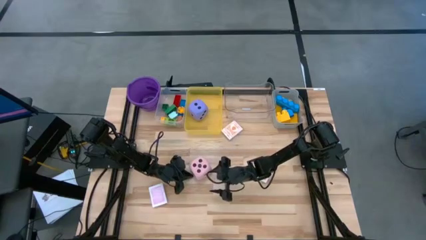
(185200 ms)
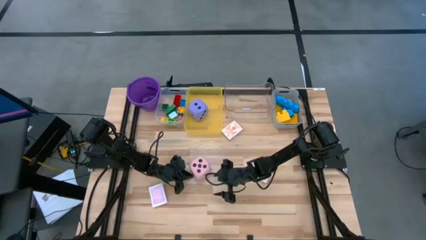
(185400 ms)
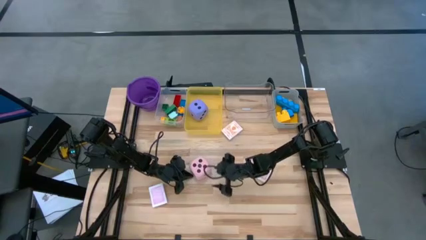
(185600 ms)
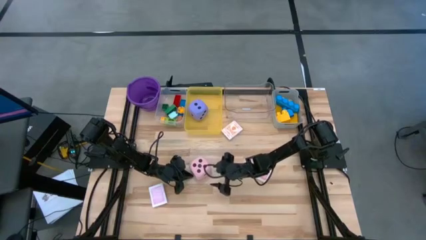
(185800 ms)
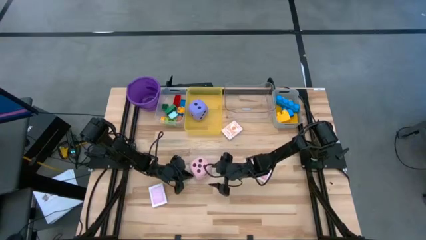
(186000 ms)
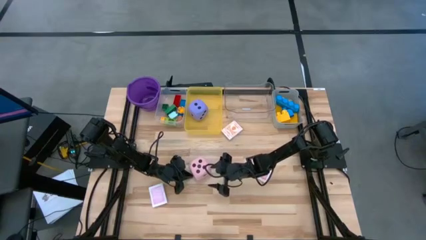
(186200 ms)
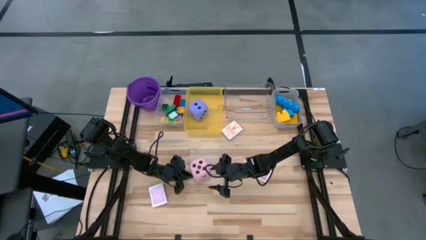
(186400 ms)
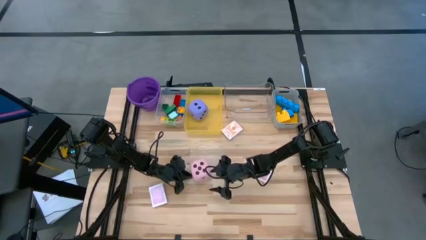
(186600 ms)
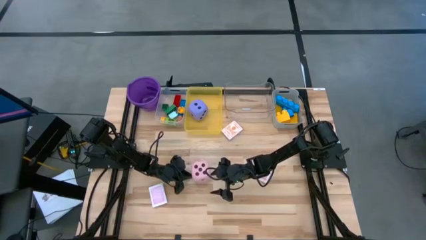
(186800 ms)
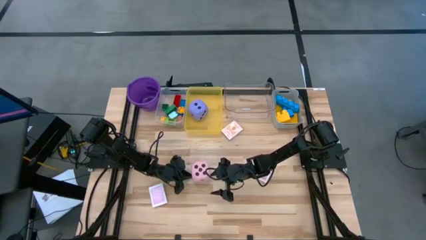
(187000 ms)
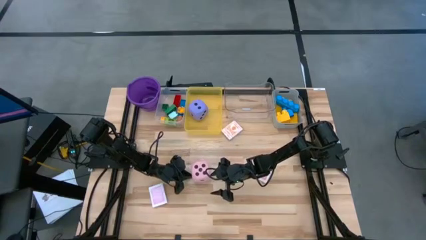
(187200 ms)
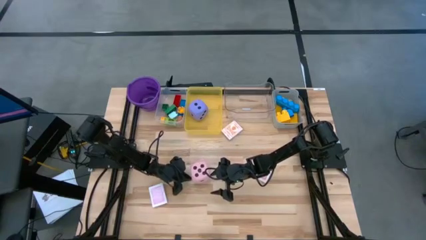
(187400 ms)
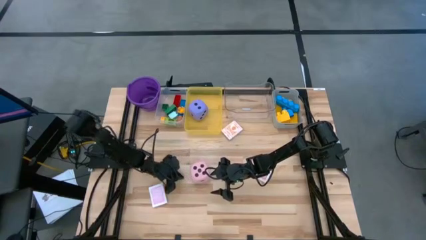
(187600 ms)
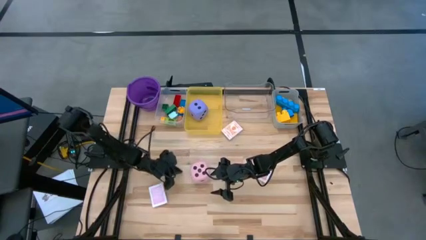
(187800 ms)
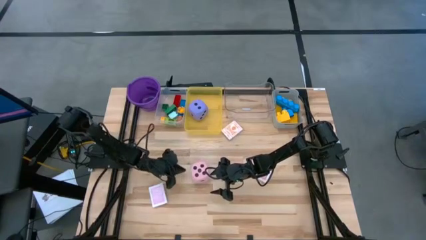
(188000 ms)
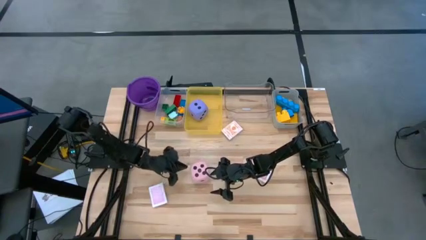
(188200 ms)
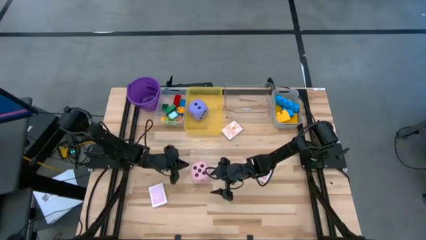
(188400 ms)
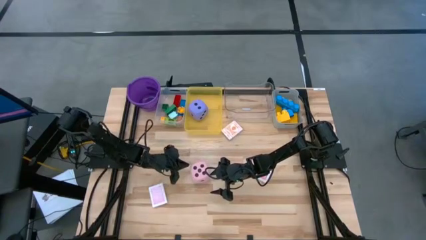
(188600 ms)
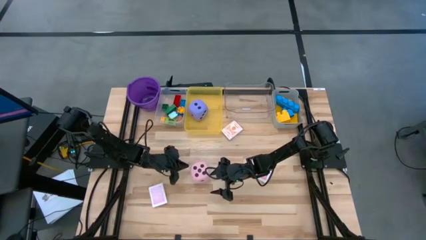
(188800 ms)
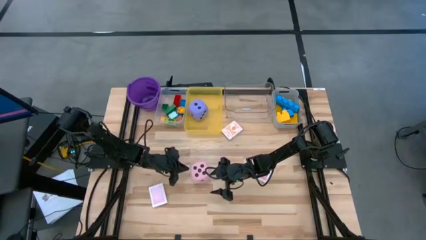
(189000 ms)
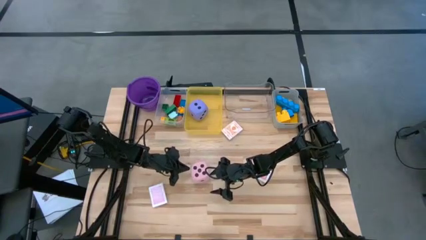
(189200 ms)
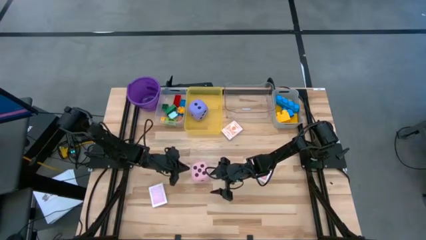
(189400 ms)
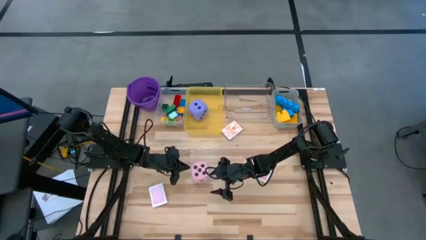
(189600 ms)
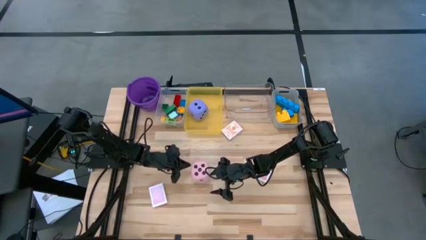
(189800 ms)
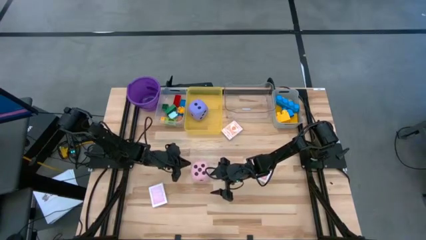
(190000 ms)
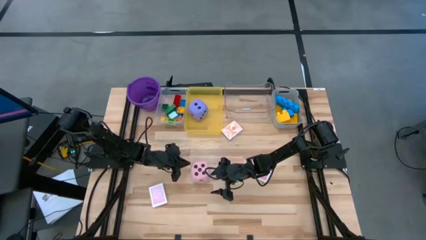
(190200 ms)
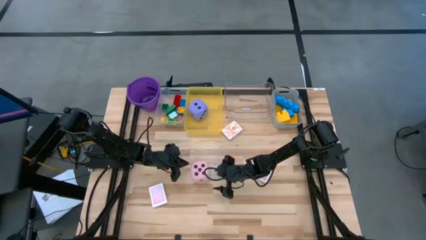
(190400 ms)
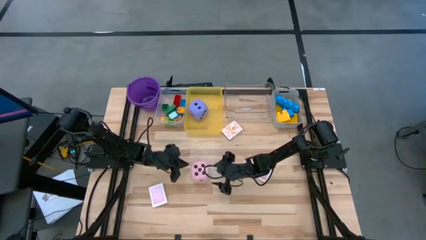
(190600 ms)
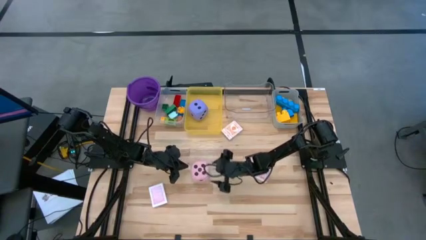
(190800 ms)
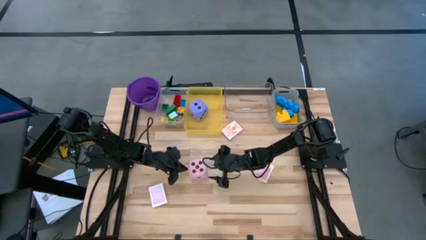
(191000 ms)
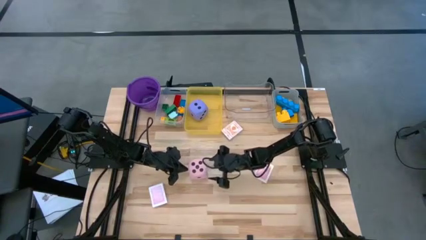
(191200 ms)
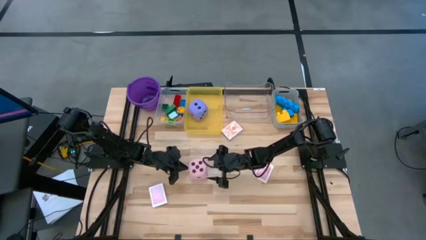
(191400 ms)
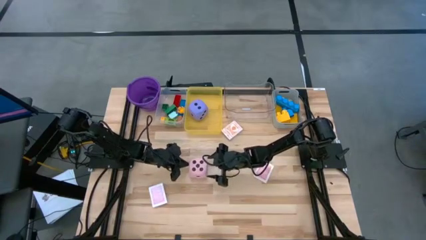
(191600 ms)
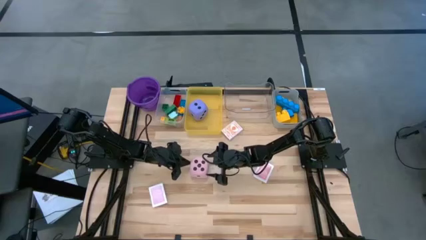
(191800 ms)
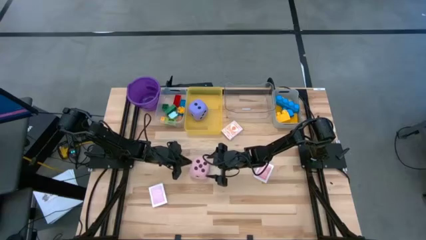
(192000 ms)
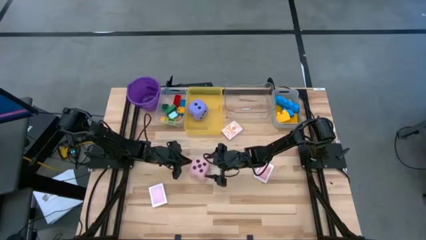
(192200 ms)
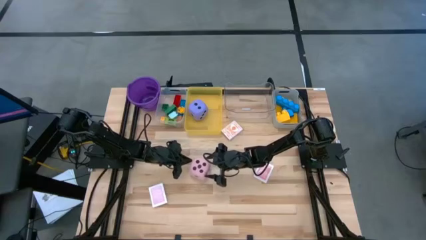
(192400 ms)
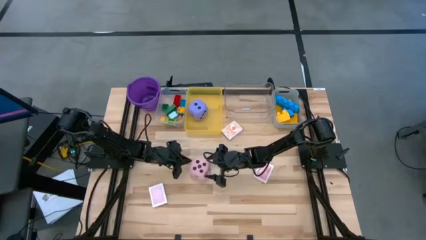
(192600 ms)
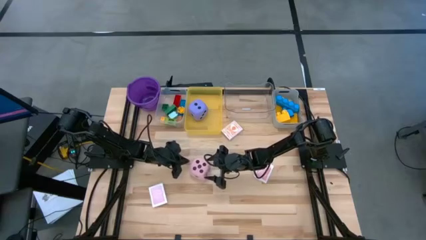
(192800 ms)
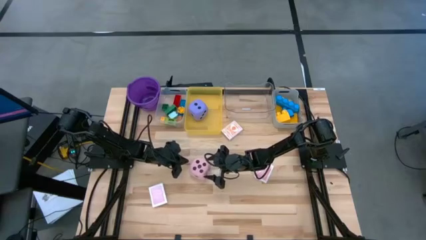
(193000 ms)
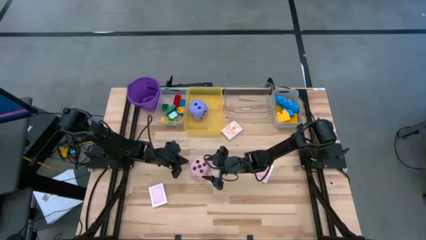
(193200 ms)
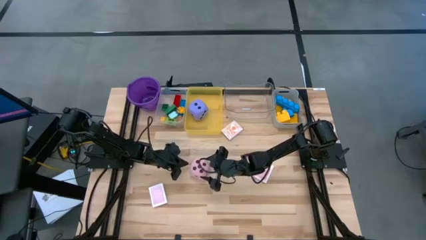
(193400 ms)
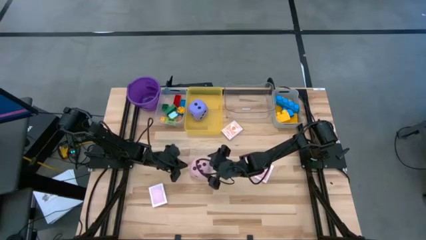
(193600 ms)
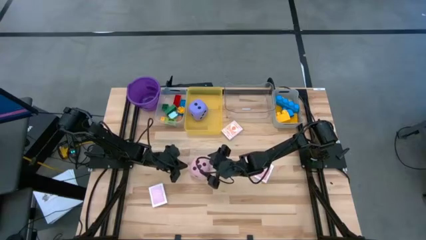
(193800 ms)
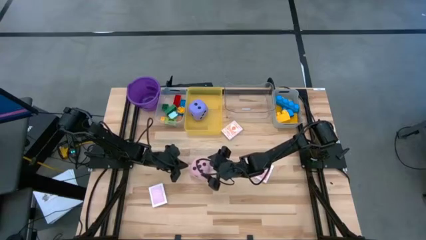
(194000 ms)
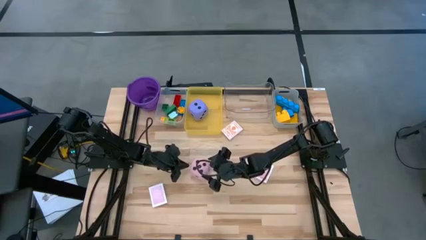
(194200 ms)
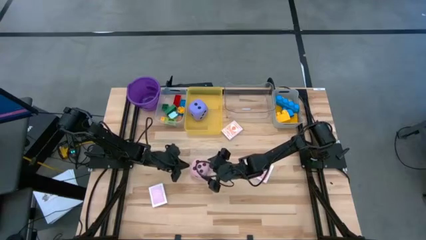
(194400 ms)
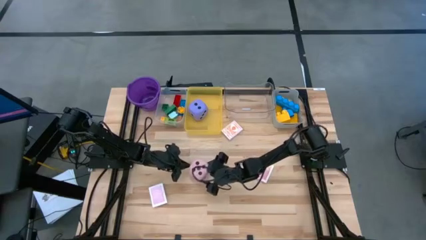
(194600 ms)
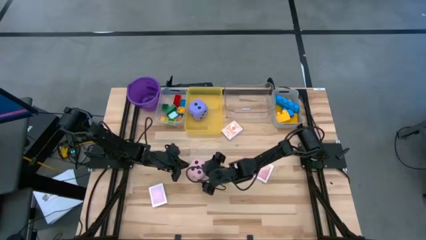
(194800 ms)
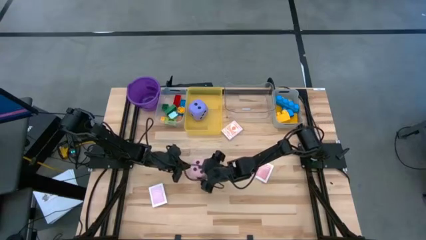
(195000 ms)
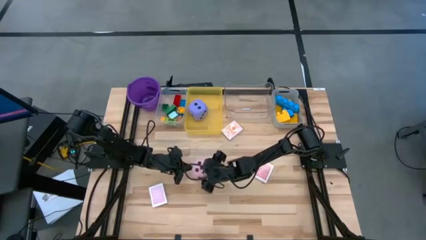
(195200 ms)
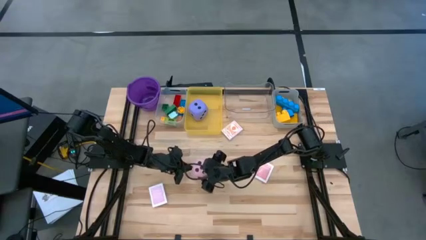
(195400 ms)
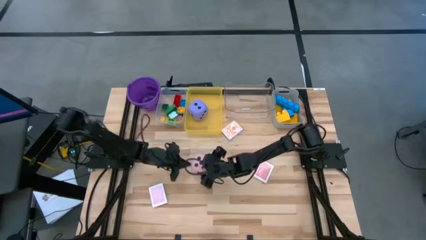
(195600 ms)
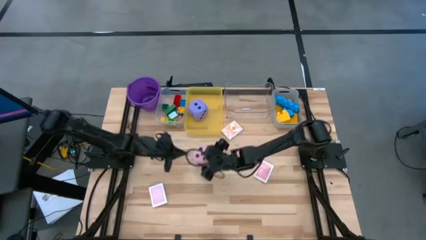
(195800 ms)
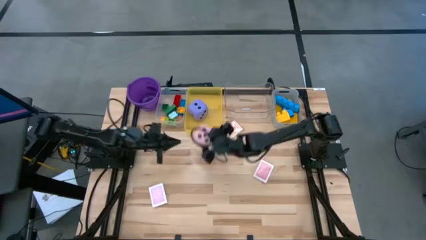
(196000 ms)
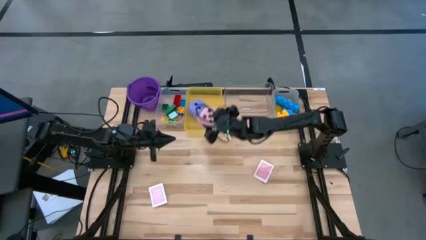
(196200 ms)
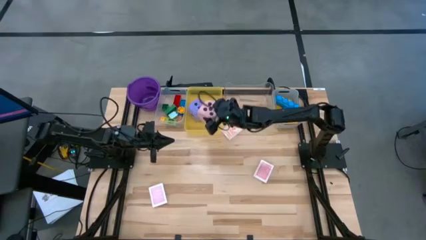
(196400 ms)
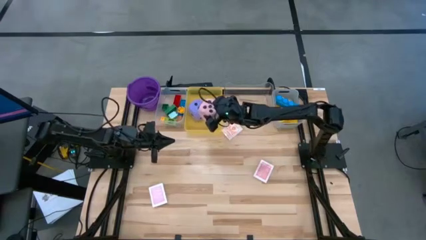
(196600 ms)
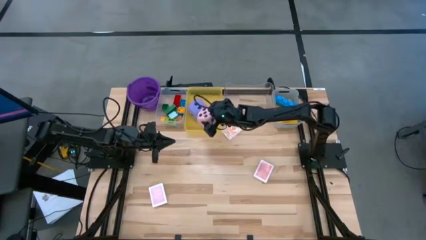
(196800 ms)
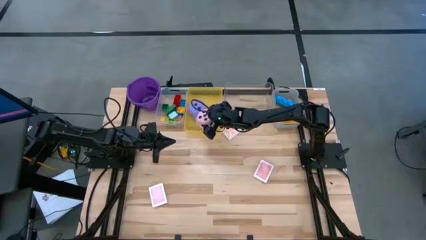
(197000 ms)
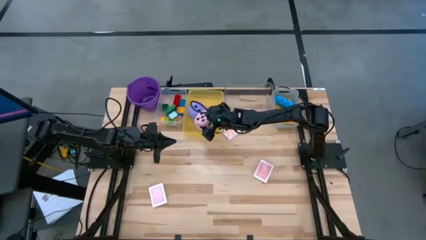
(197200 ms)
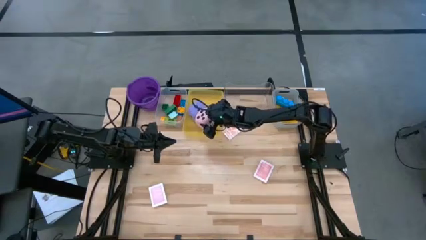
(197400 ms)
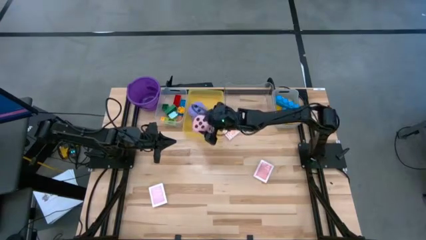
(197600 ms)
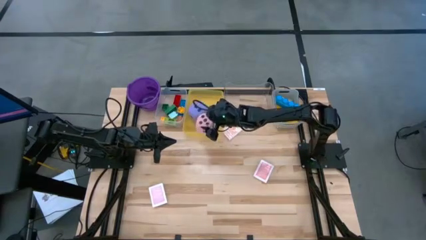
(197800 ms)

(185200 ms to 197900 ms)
Task: Pick & Place Toys
Put the large pink dice into the yellow bin

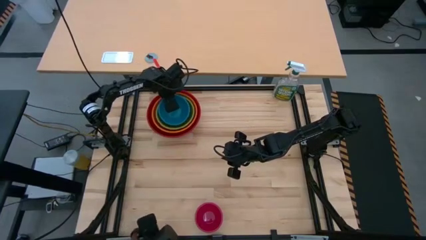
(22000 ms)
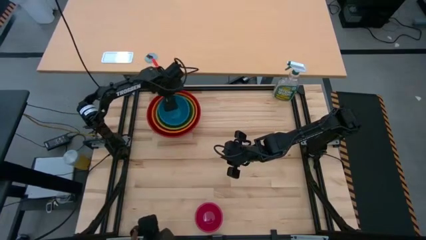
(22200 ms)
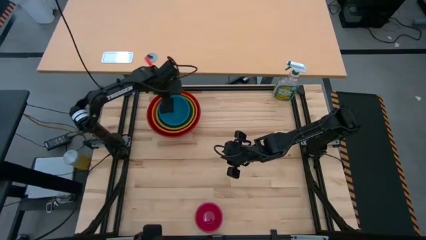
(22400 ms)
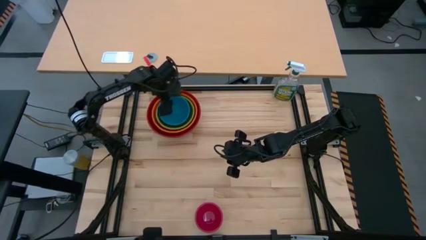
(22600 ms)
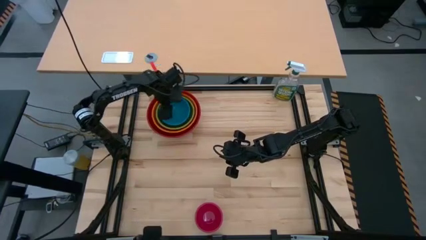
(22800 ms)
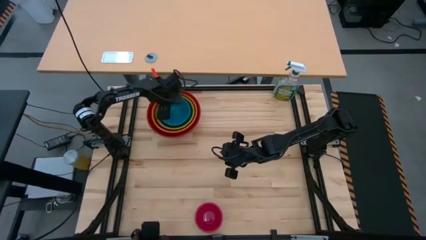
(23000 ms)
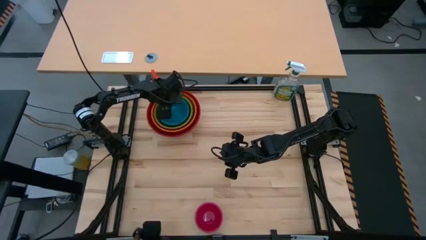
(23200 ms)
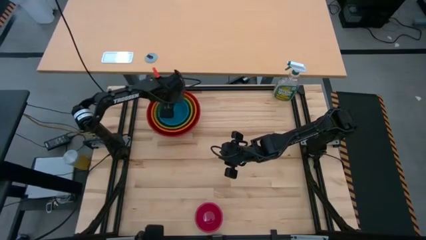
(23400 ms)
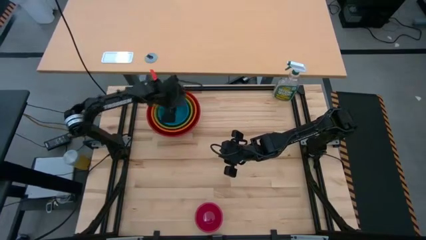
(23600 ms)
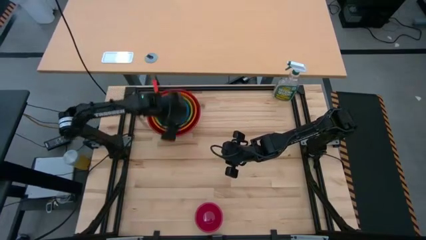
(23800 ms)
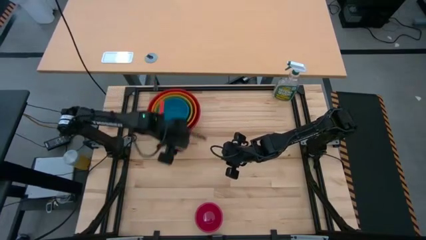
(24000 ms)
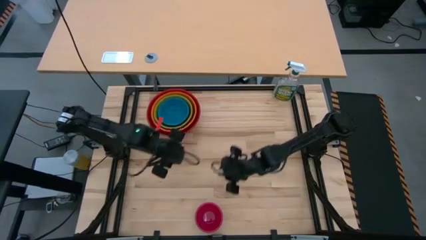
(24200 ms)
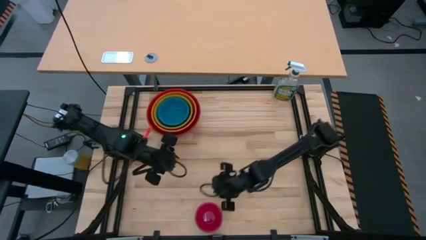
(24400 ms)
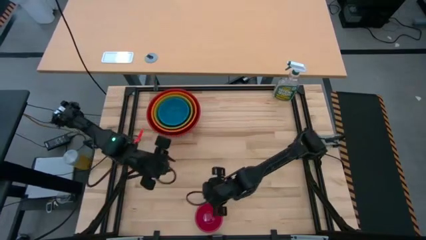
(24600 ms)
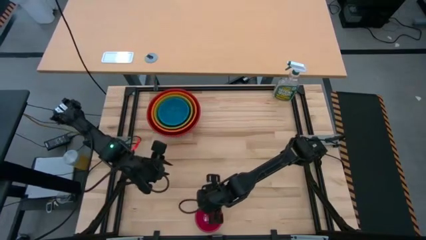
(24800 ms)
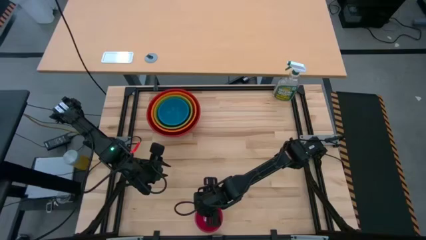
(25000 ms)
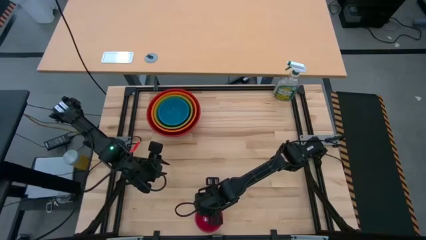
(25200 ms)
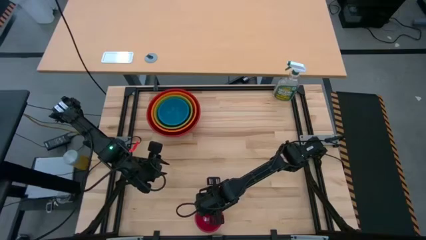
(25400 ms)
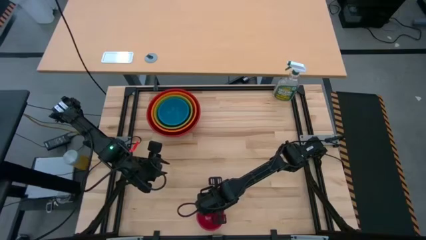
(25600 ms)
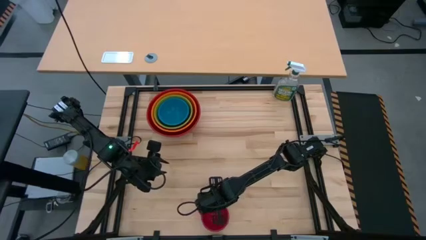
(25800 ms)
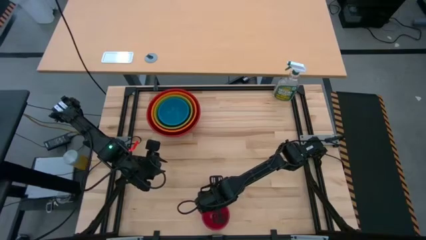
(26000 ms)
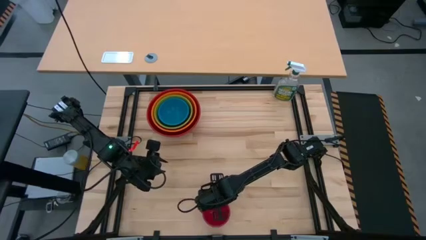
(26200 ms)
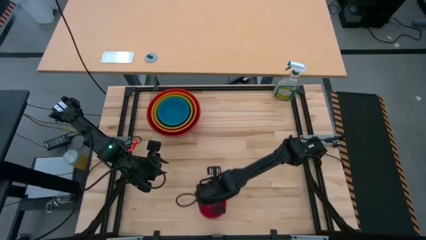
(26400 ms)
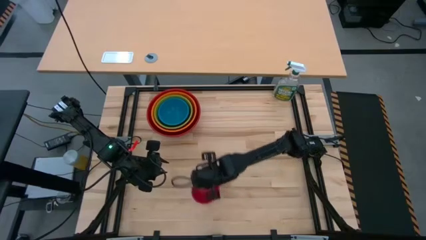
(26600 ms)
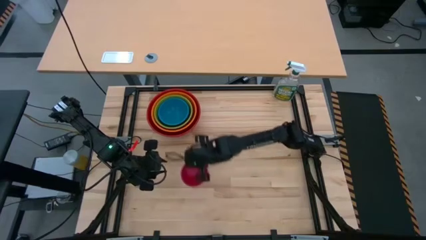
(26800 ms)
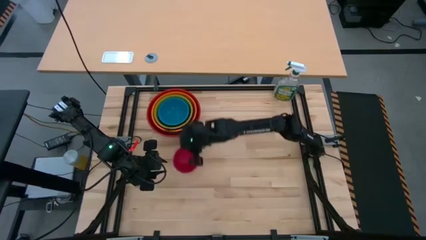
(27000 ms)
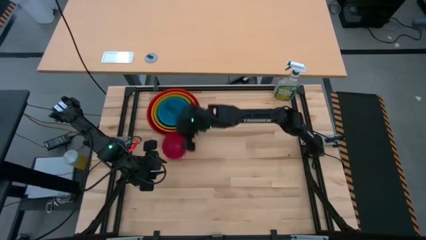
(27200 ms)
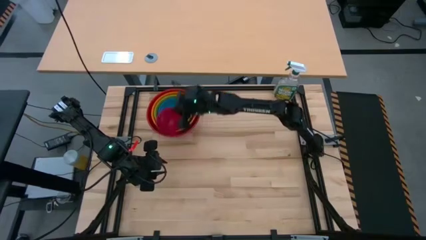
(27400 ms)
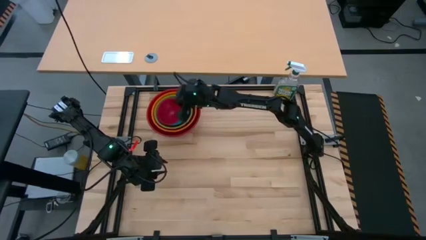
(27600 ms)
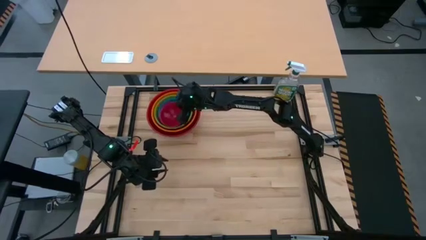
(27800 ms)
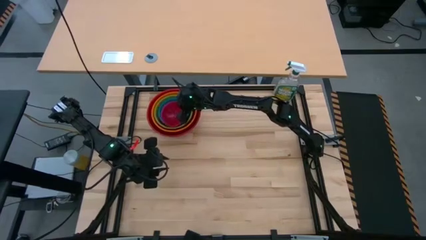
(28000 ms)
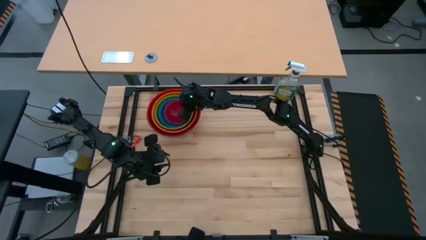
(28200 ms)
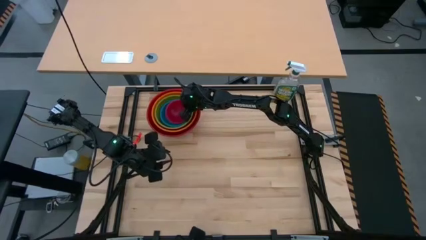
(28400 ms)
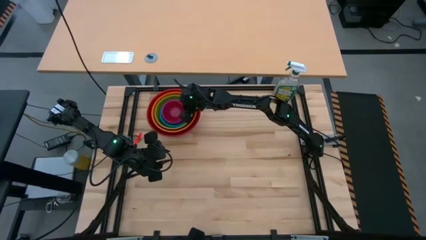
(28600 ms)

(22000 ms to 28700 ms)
Task: Nest bowls inside each other by size order
Stack the pink bowl on top of the blue bowl
